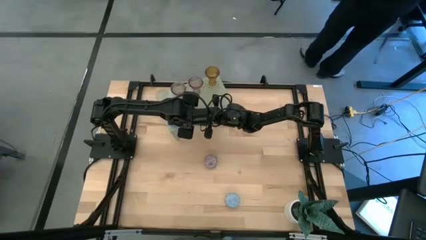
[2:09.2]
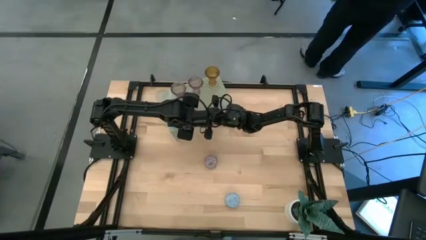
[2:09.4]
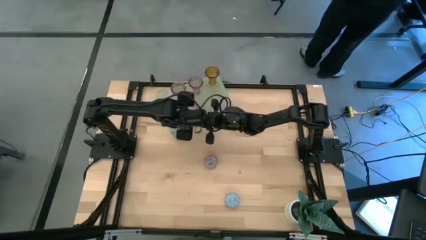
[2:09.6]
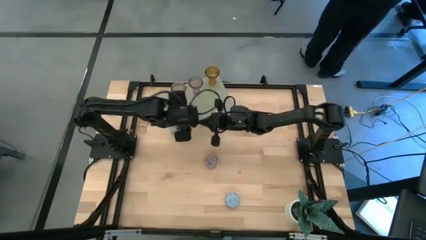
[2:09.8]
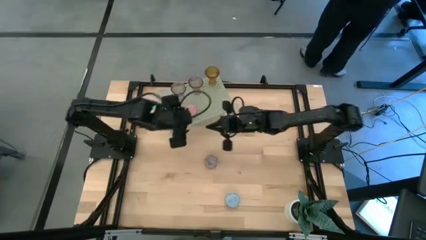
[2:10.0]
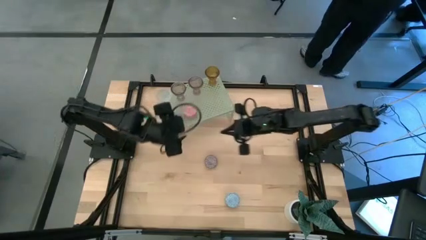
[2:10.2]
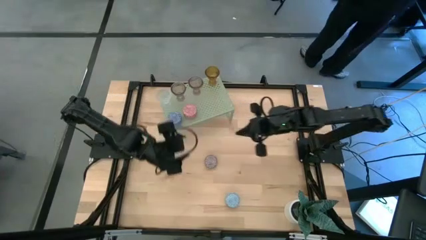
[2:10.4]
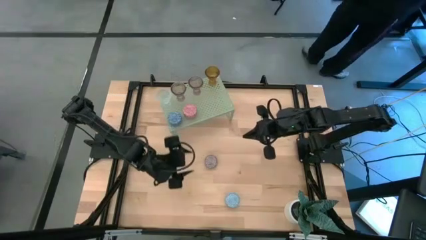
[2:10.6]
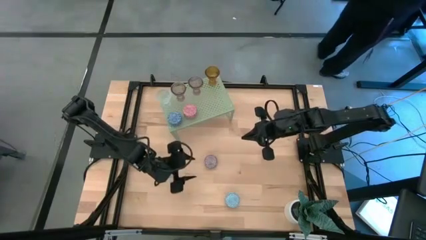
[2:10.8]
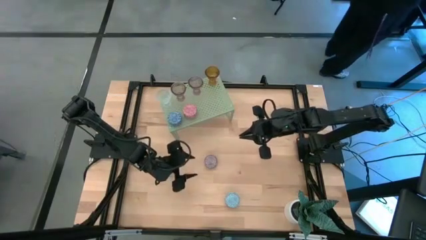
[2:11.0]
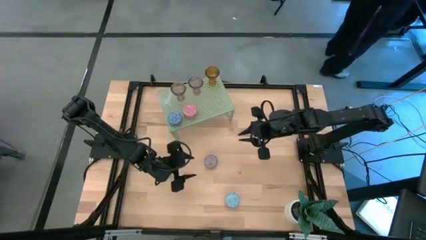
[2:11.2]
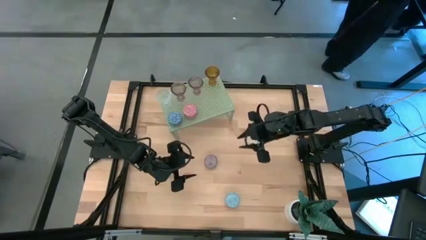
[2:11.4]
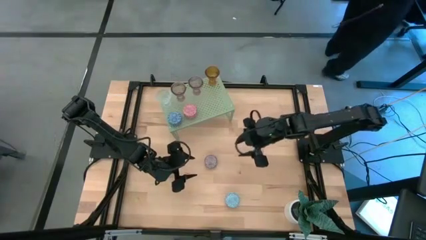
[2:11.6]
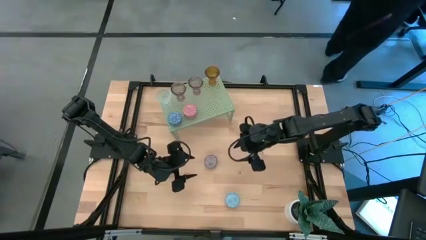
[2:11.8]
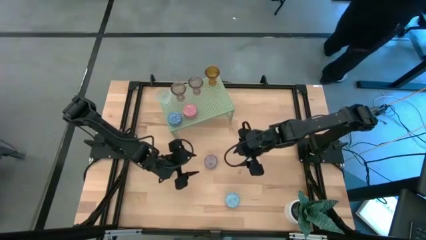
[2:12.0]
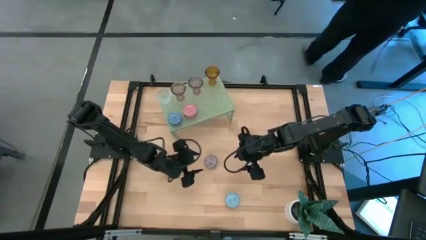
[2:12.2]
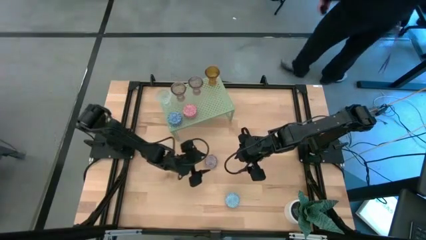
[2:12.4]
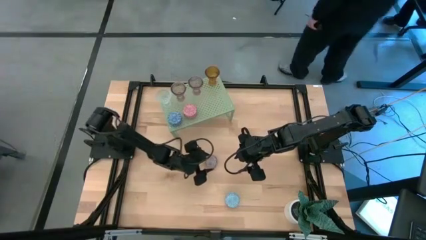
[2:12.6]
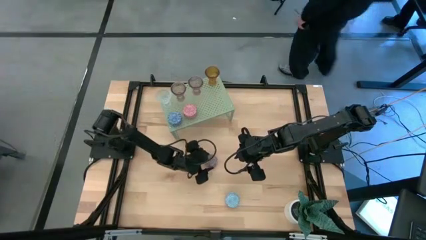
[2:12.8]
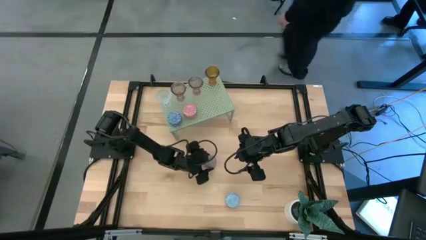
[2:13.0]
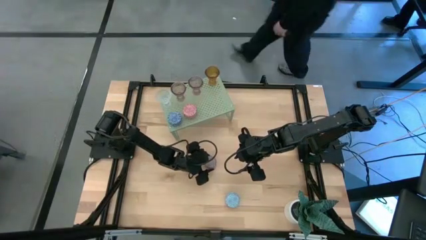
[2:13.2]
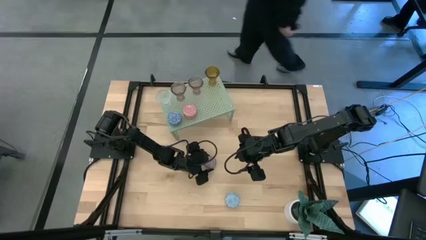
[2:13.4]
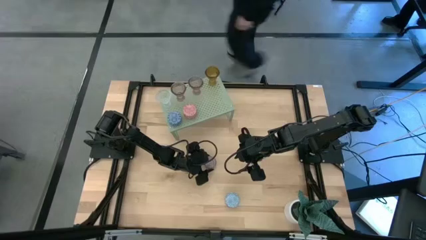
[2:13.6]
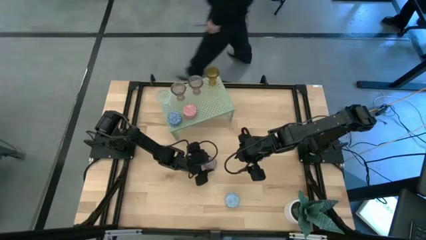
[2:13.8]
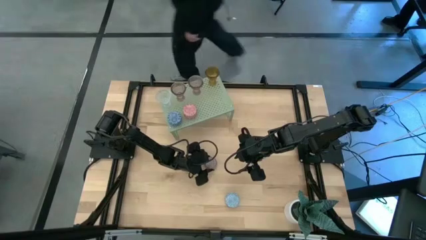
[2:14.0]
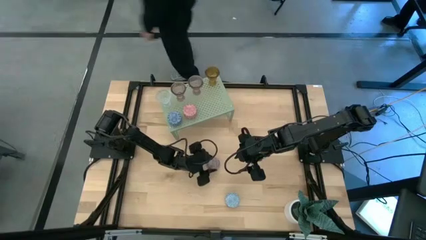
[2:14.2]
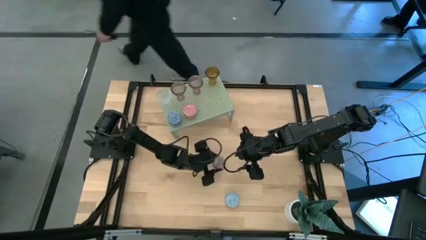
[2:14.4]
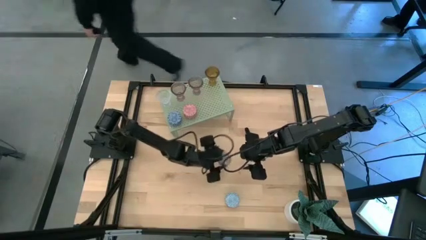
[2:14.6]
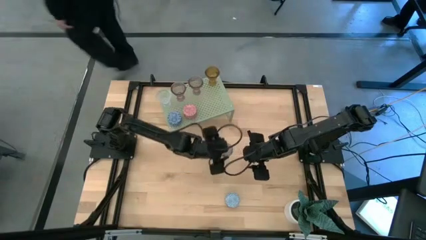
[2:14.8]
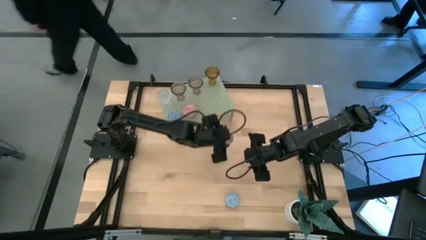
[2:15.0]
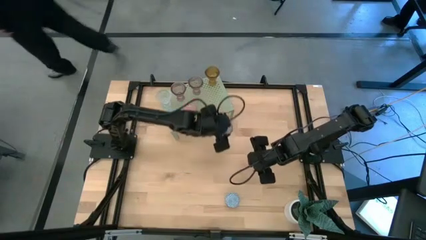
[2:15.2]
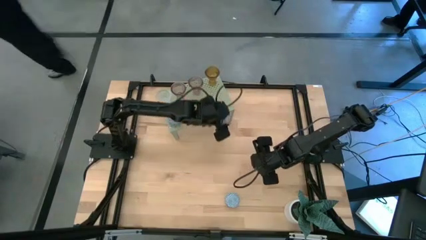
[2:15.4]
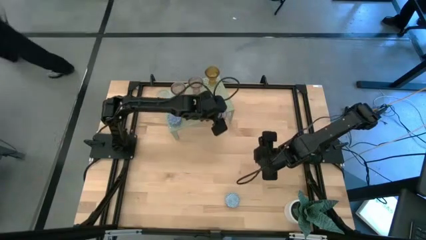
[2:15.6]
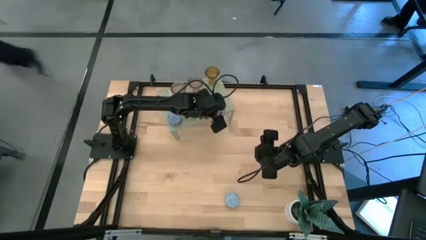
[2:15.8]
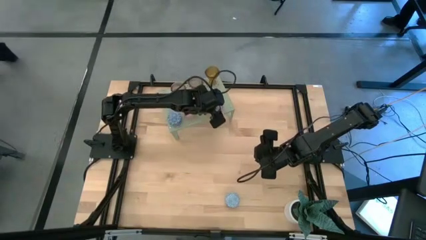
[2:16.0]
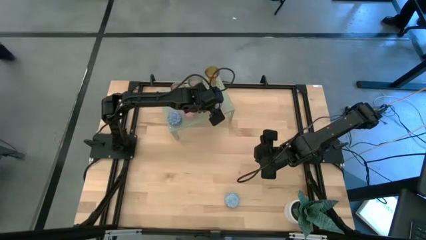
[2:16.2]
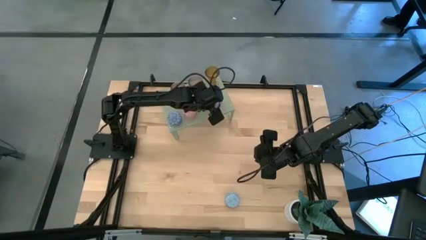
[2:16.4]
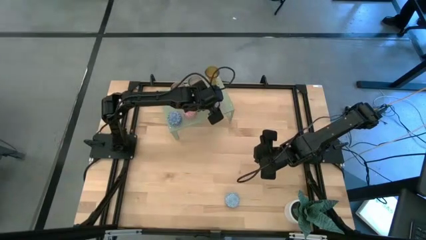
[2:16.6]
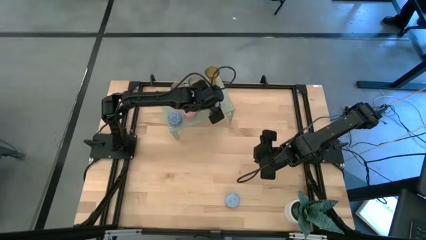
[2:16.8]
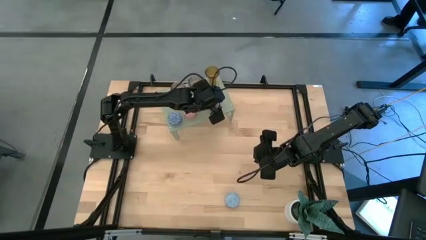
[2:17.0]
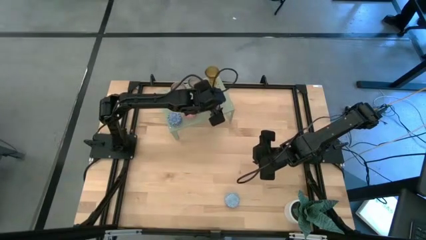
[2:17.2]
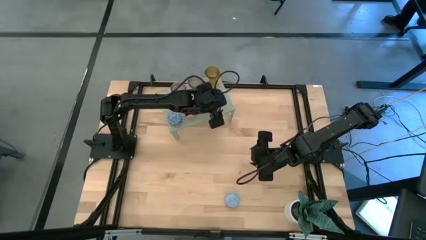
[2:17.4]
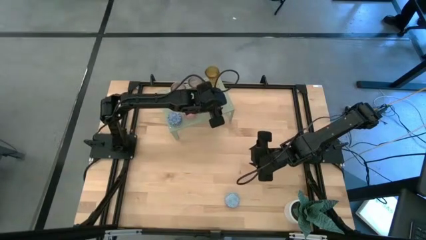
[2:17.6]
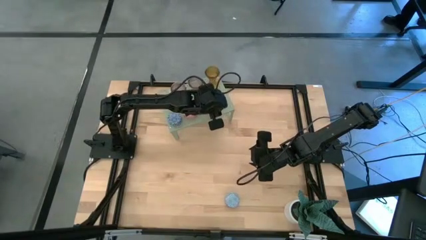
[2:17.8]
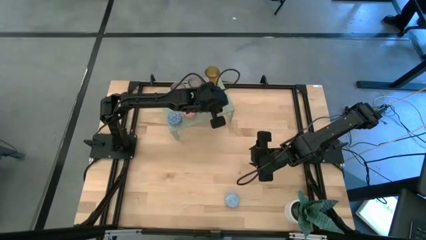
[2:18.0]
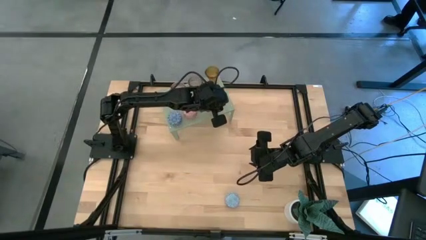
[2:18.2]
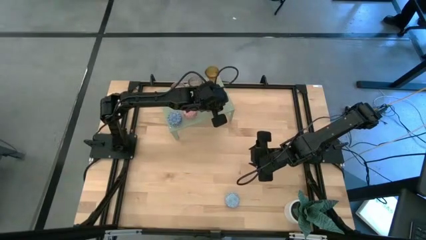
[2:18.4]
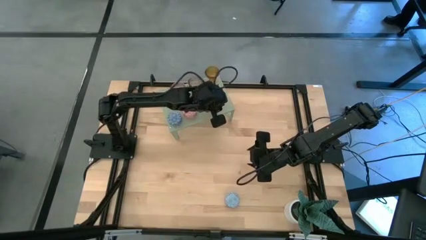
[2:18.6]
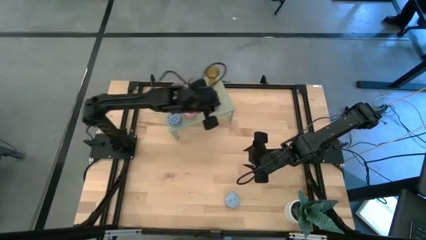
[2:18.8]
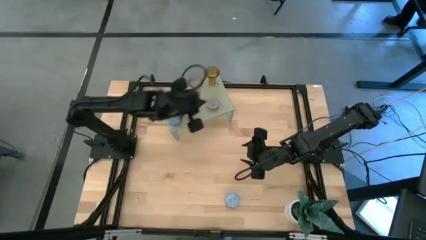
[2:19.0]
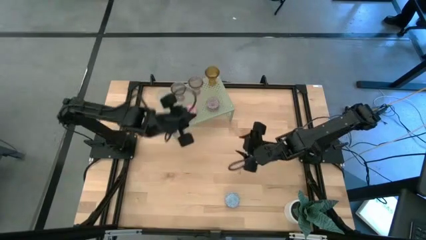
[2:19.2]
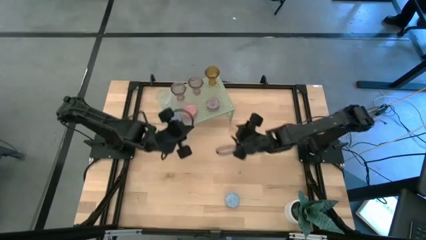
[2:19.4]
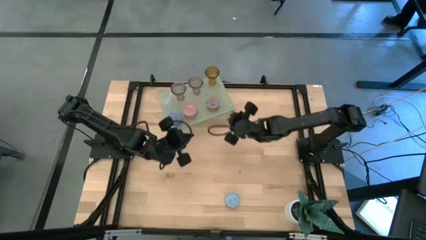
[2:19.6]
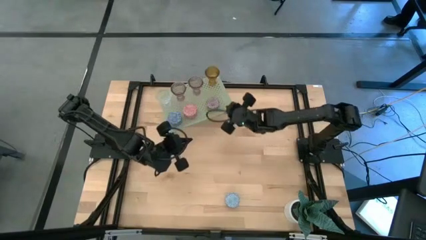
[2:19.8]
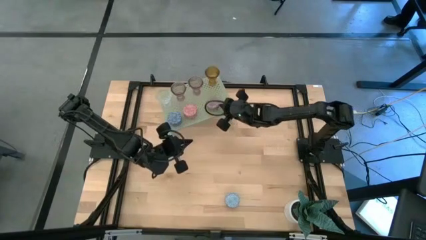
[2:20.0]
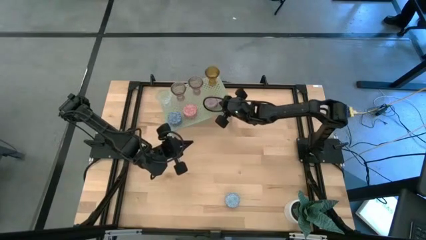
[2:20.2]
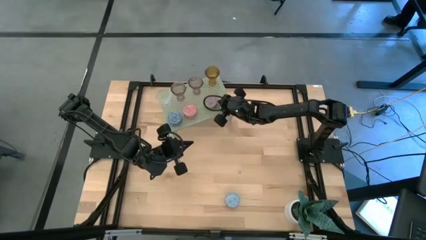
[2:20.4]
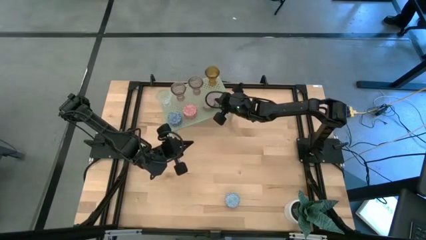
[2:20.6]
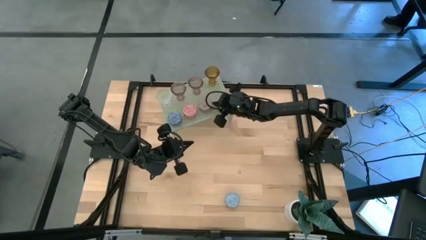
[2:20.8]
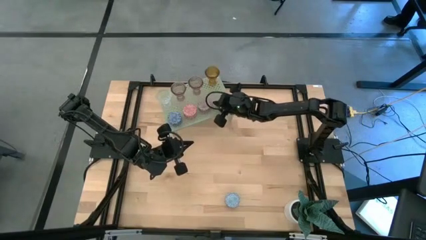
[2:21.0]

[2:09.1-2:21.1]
Task: Pick & Place candle stick holders
Put the red scented candle on the shelf aligned with the other scented candles
